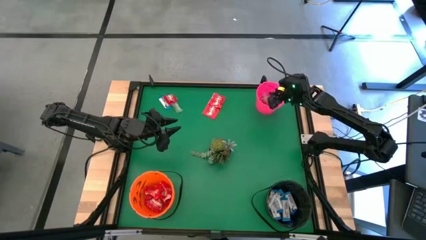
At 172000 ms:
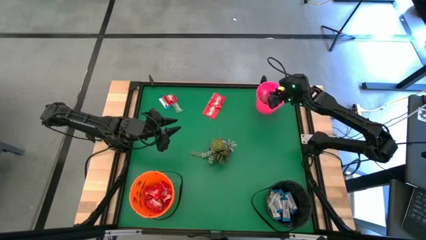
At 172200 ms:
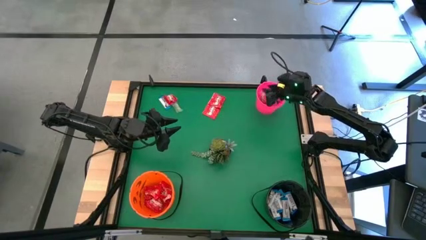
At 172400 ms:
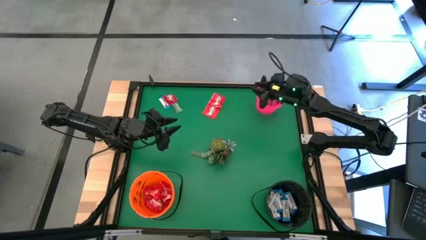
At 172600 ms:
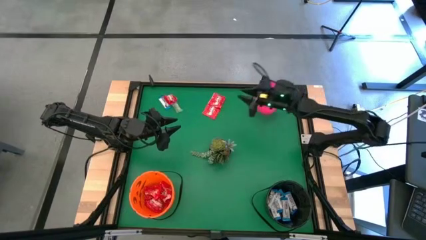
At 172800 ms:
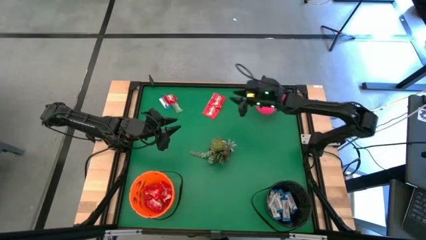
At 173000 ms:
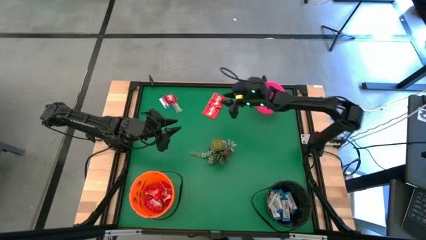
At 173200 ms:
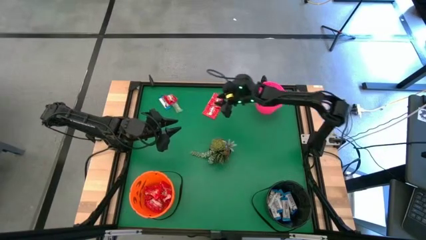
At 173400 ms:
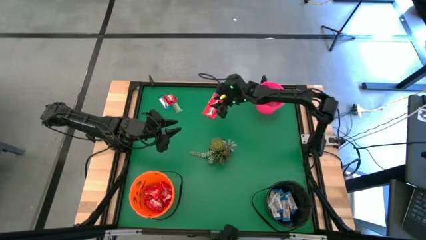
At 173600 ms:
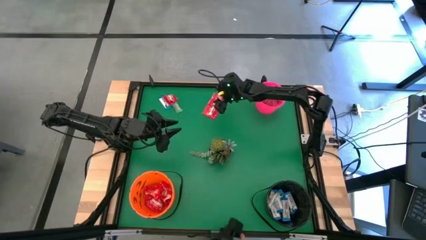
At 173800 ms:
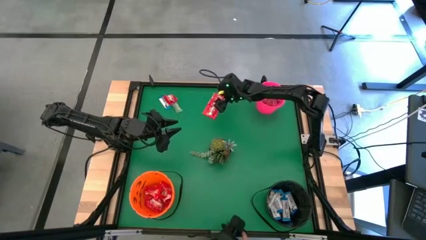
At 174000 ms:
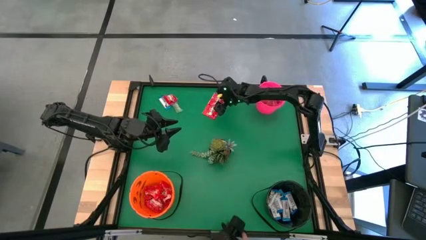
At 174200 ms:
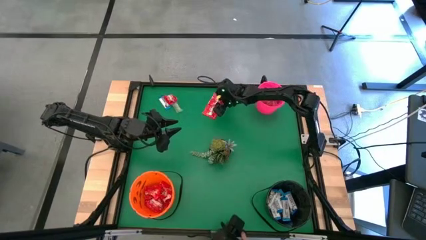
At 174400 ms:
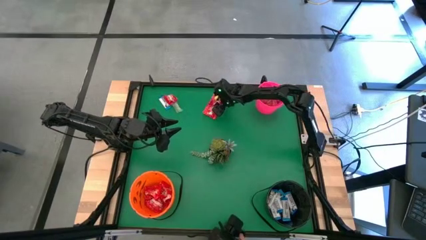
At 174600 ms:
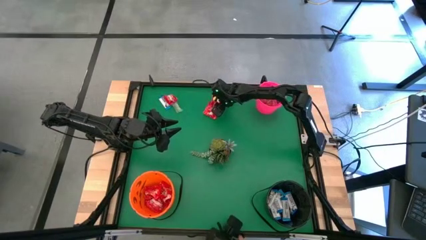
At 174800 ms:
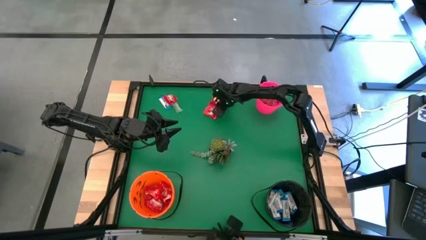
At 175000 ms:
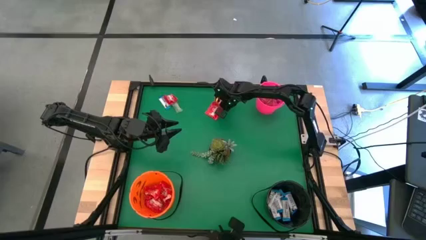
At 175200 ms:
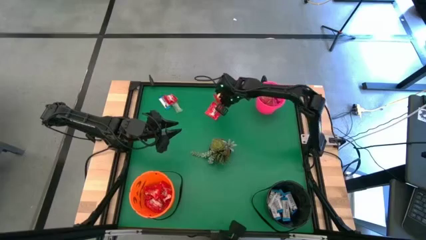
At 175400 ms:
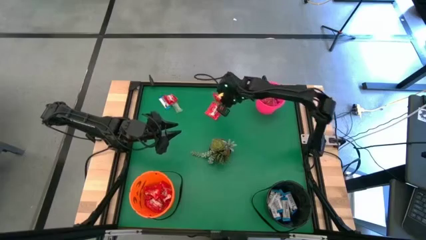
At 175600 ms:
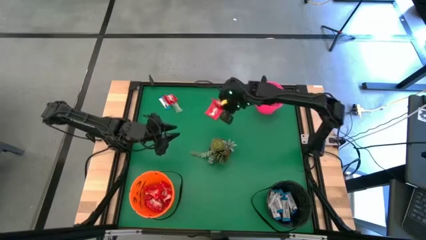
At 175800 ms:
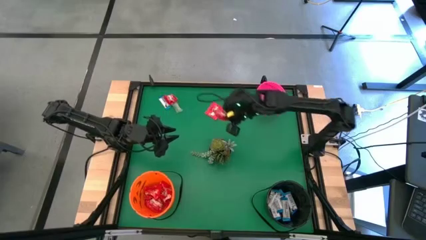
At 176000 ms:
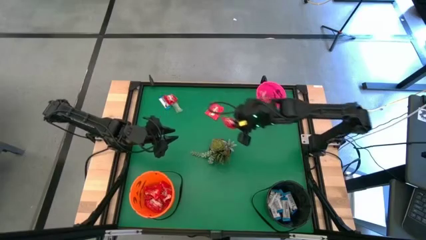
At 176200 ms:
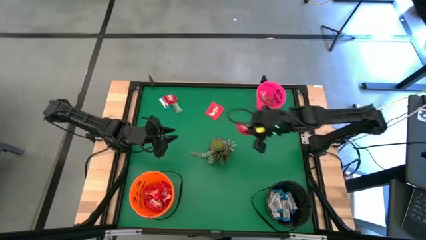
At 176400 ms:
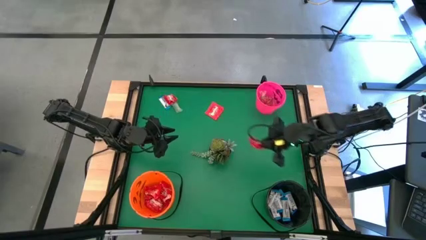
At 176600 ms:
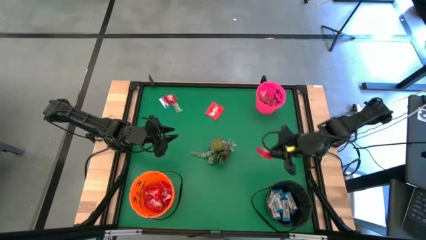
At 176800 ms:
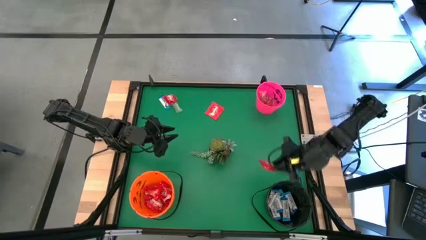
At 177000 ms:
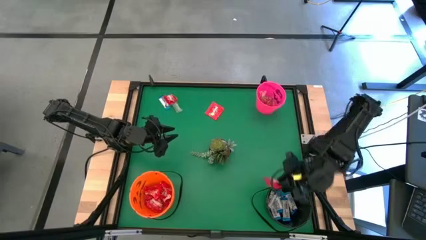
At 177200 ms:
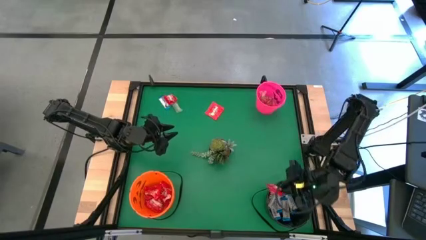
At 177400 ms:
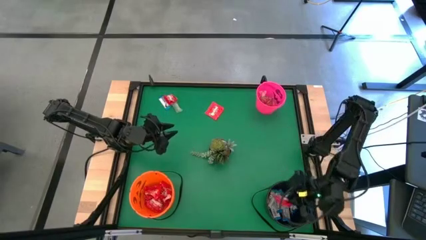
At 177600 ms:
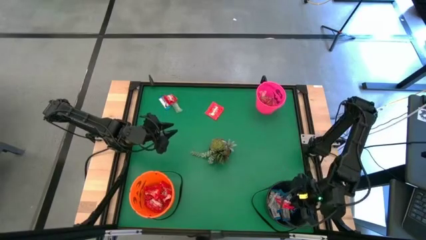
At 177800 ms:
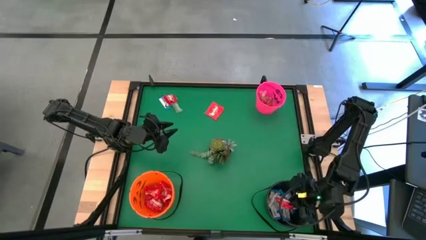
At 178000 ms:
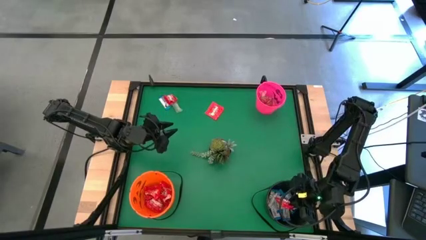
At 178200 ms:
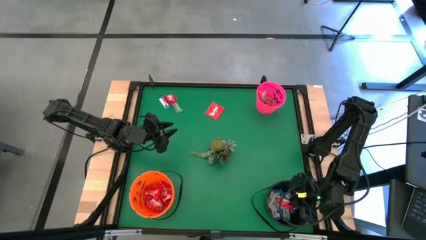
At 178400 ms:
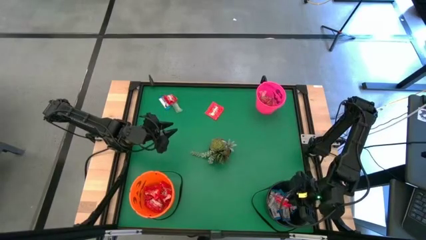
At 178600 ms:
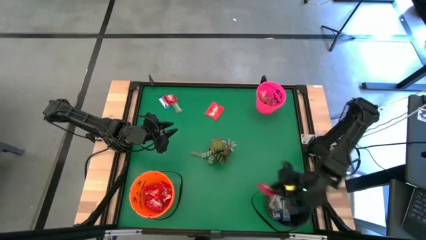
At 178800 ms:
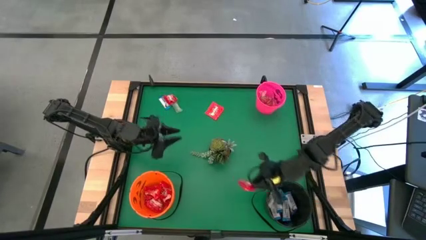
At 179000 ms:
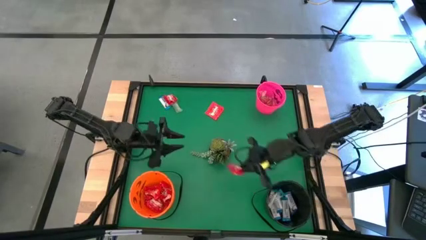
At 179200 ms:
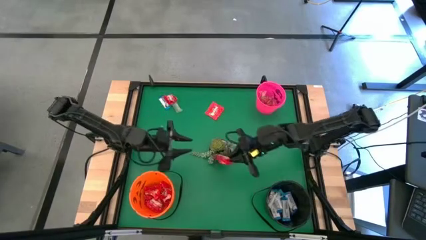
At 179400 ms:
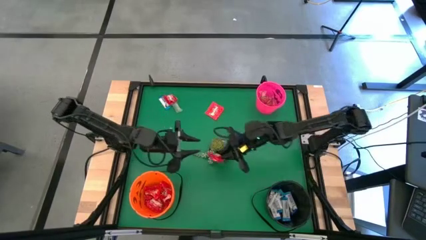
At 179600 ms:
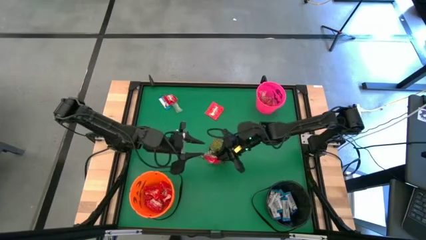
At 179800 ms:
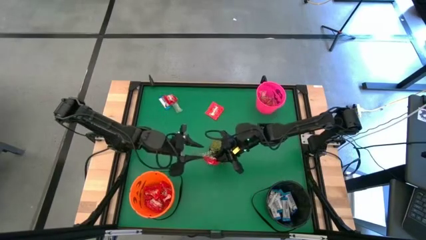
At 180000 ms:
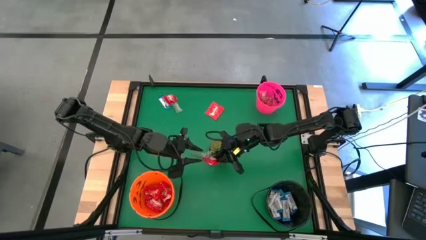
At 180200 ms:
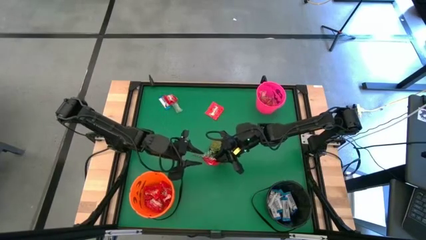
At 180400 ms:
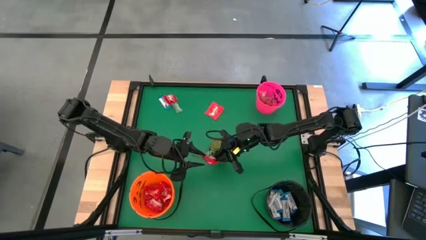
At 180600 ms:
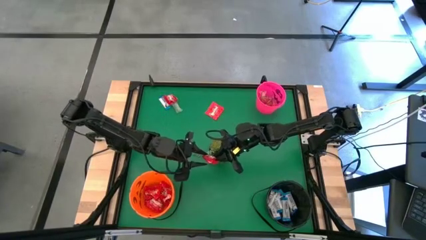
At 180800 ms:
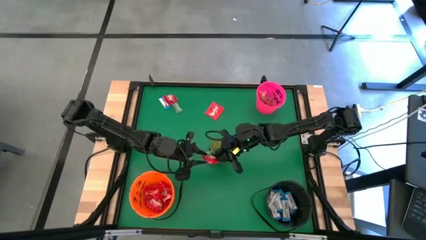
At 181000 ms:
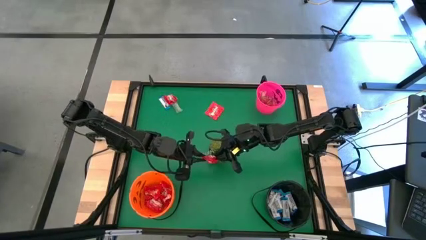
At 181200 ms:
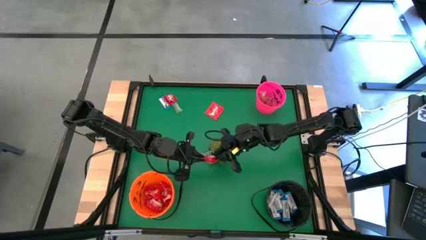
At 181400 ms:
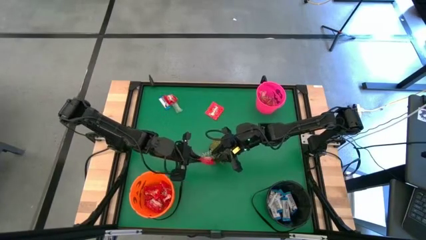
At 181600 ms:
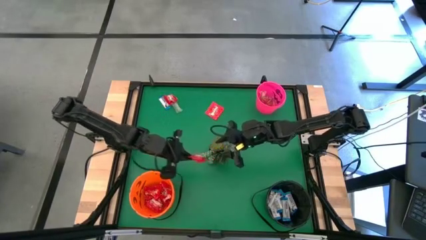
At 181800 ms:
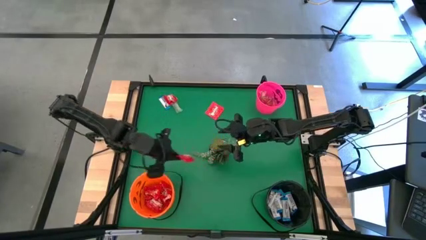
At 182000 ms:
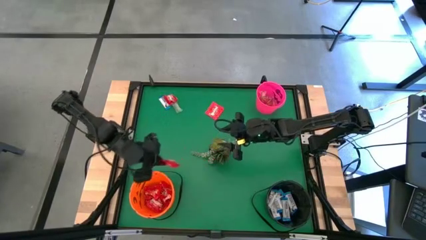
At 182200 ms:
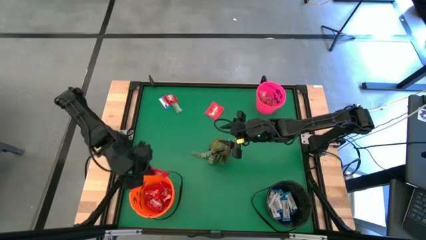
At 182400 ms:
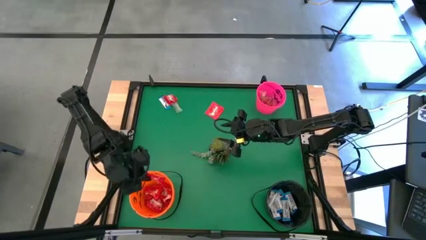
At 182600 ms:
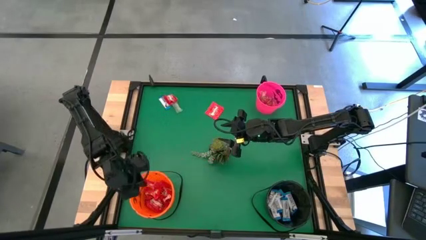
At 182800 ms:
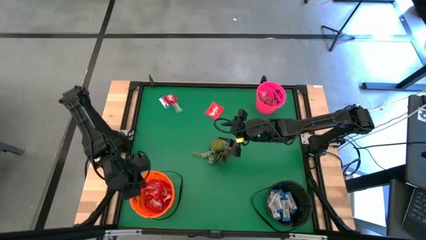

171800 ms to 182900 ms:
Task: Sort candy
Put the red candy into the orange bucket

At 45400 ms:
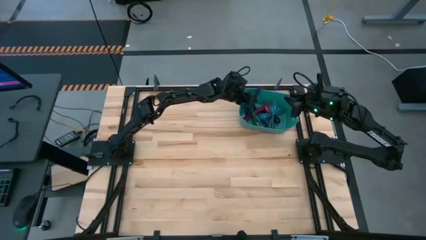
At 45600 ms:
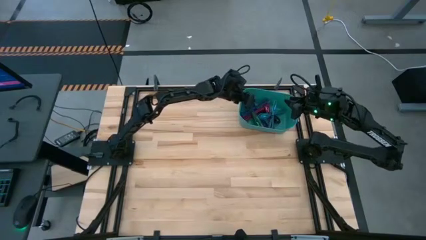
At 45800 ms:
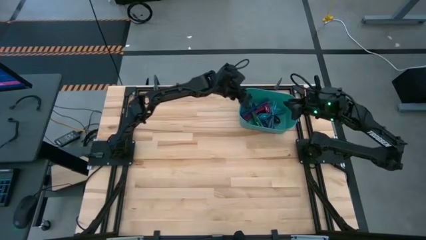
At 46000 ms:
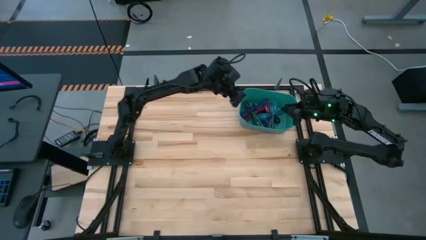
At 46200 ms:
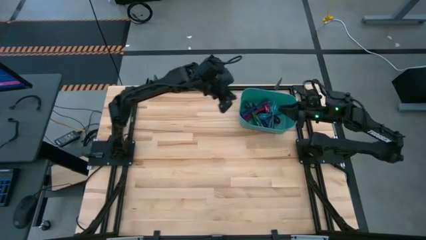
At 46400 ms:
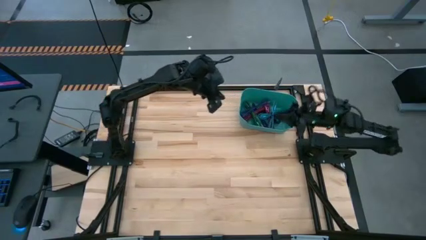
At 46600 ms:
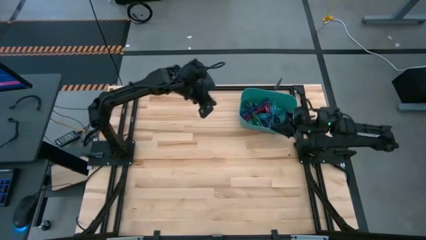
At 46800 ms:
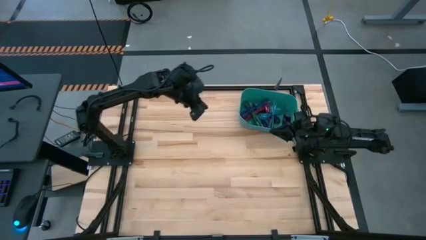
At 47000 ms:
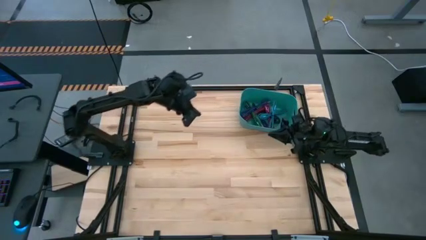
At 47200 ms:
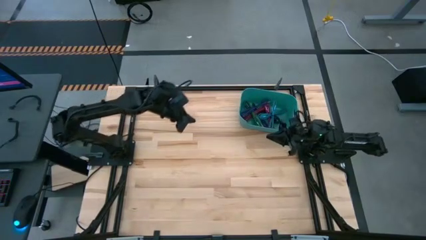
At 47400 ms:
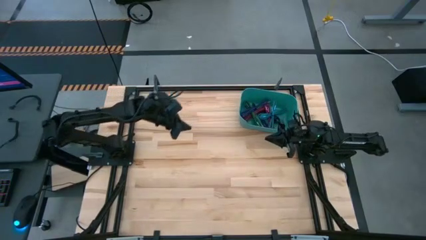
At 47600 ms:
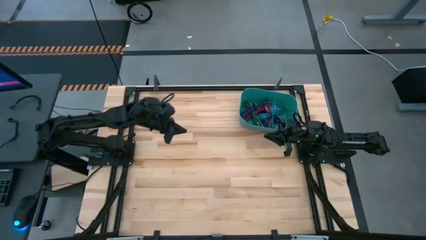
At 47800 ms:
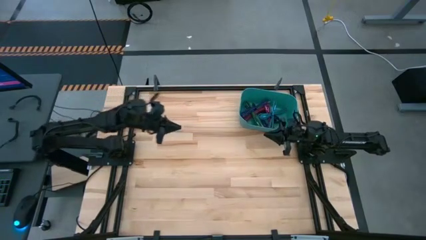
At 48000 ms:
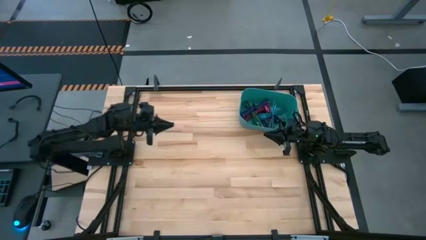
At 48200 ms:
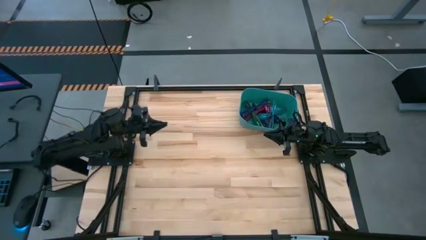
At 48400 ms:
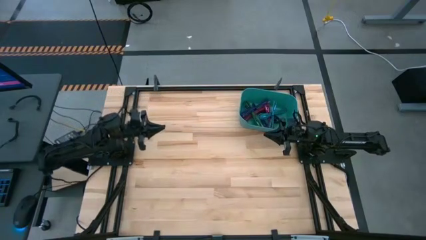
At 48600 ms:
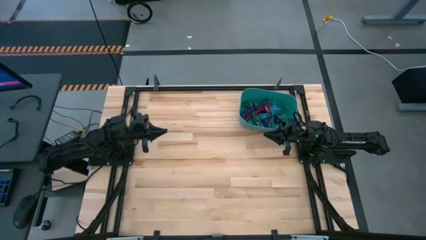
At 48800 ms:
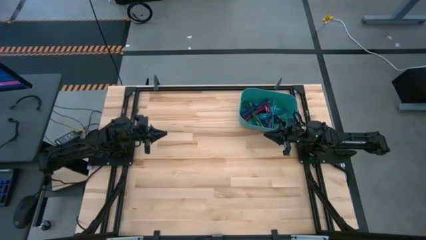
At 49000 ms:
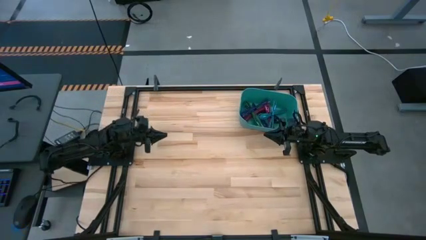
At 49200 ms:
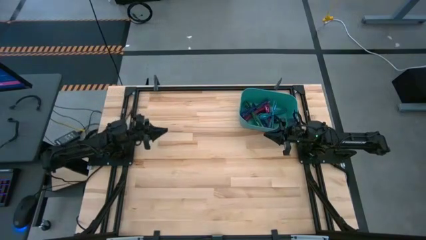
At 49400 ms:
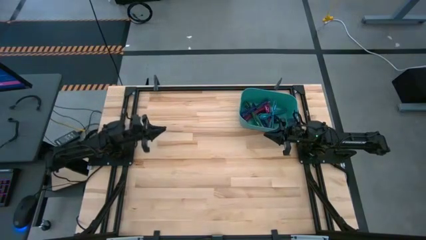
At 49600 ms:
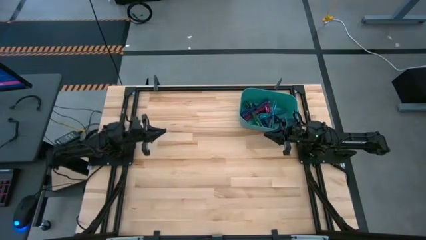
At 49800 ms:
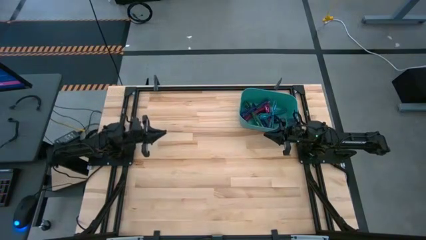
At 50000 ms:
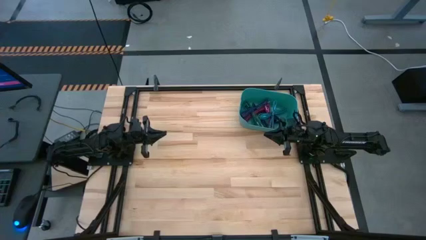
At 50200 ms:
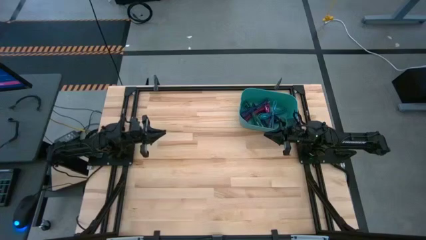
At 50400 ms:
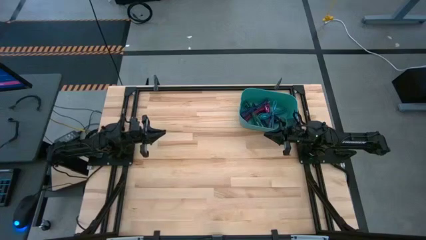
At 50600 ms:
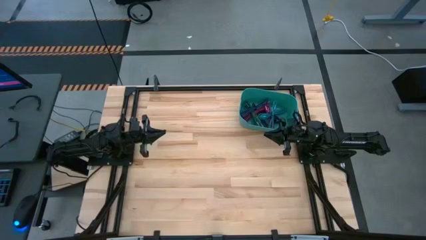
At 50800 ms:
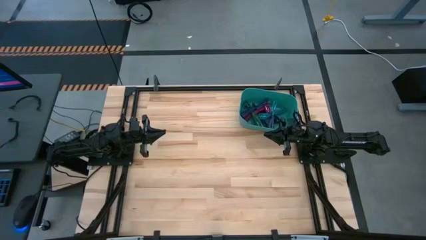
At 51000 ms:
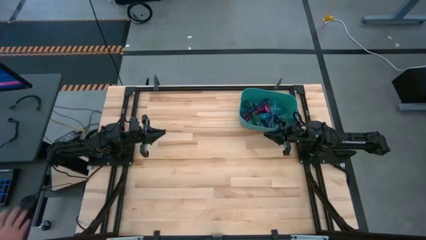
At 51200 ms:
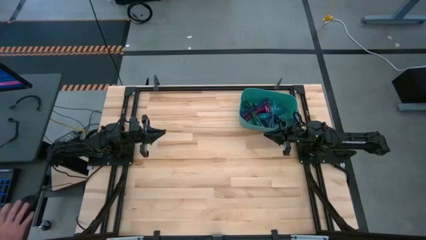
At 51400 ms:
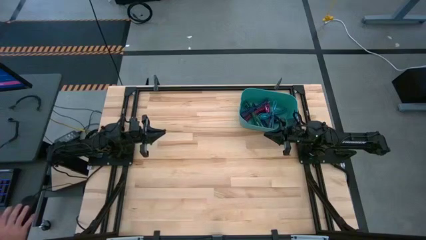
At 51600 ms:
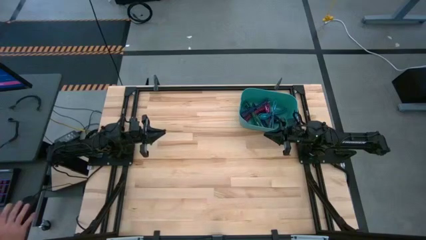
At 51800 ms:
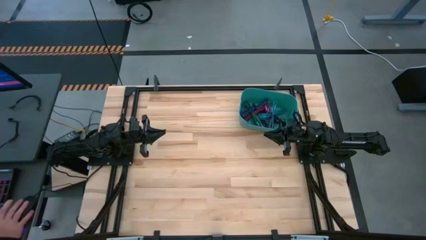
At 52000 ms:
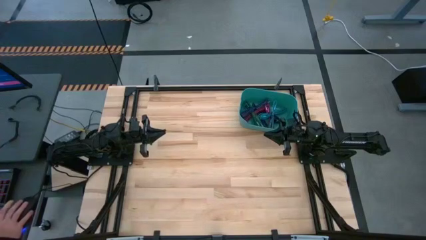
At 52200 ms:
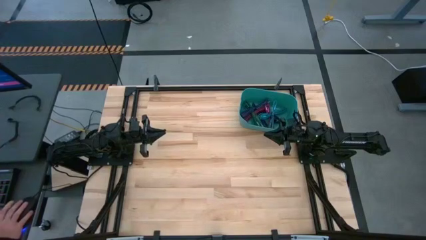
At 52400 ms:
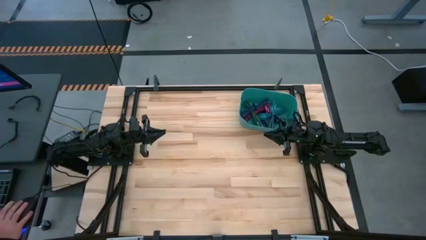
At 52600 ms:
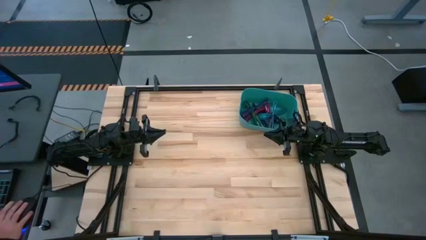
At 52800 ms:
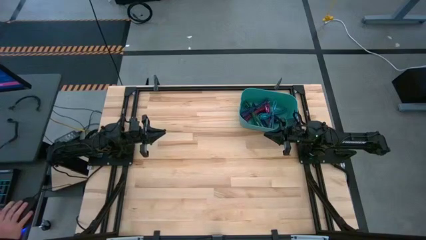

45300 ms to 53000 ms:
Task: Pick and place USB-C Cables
Return to Home Position
